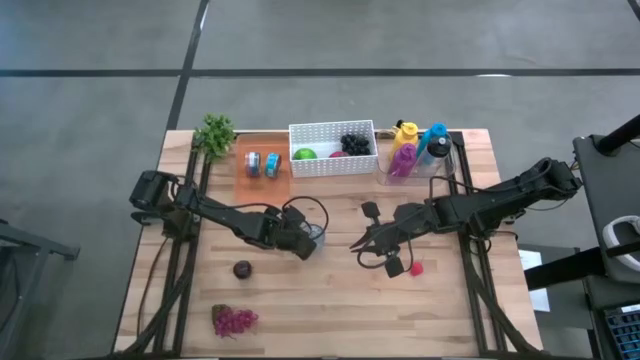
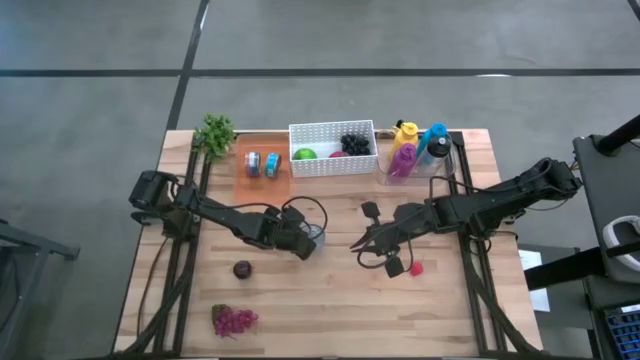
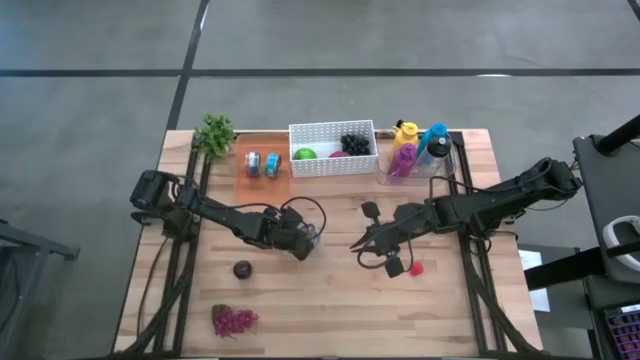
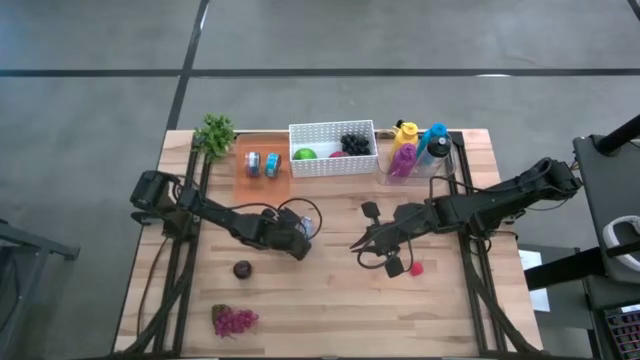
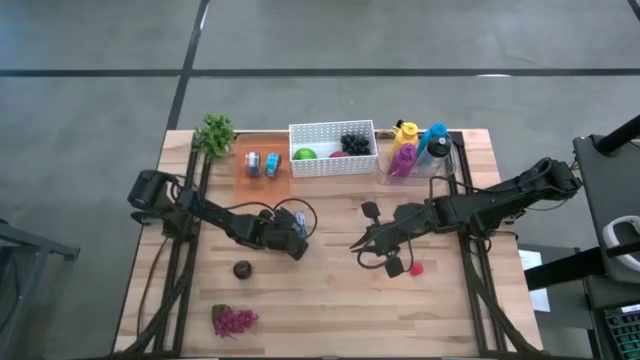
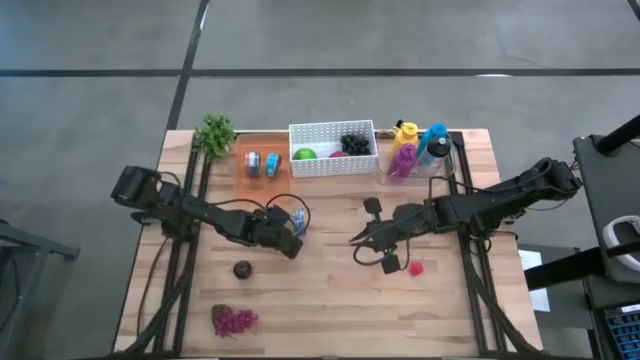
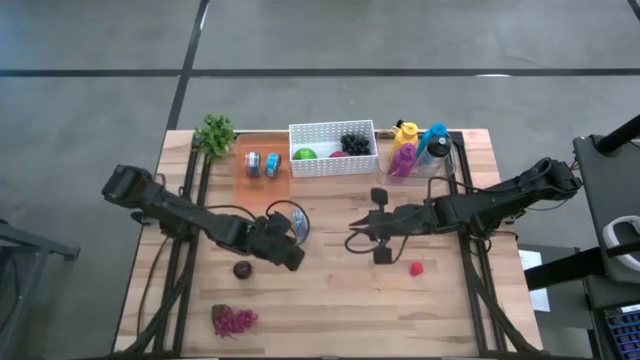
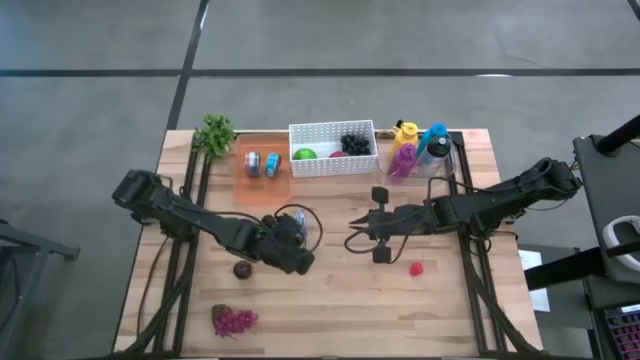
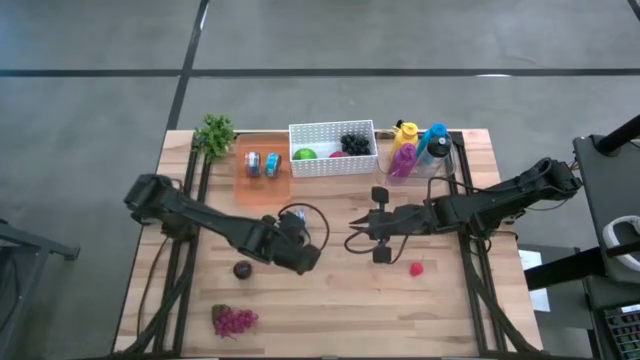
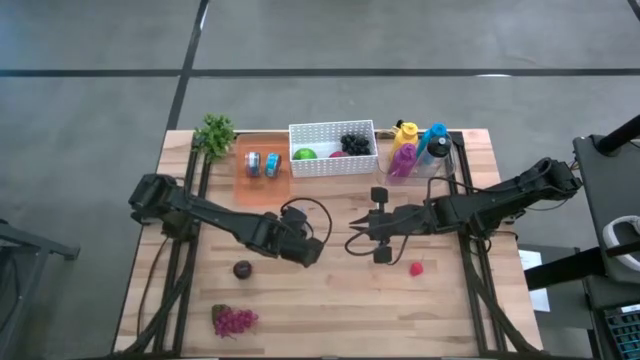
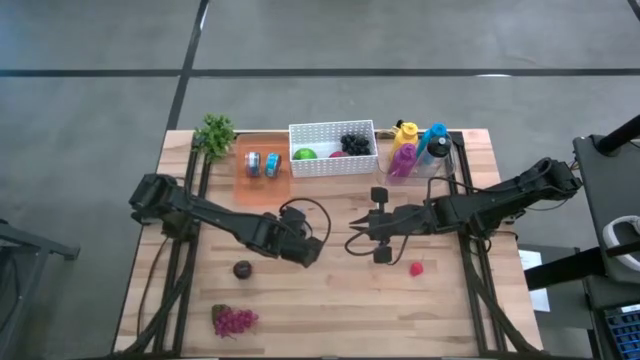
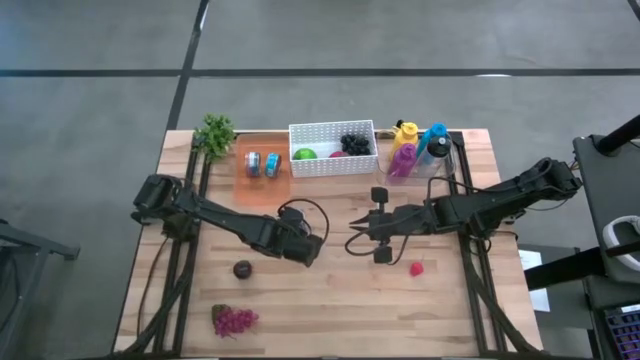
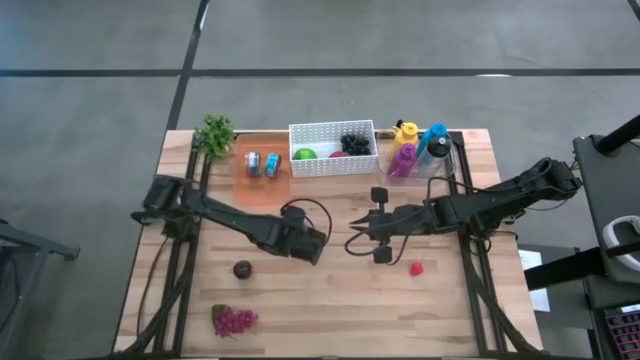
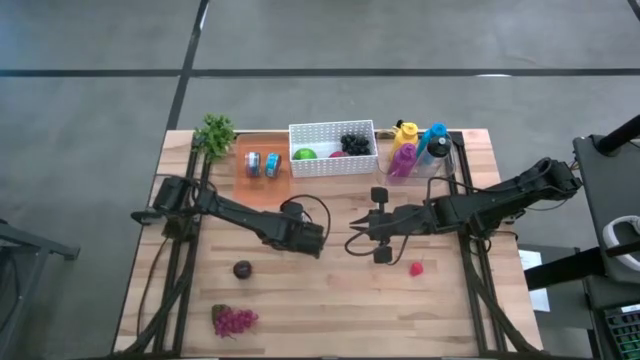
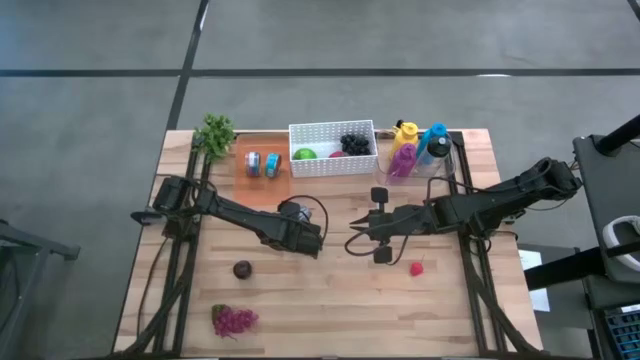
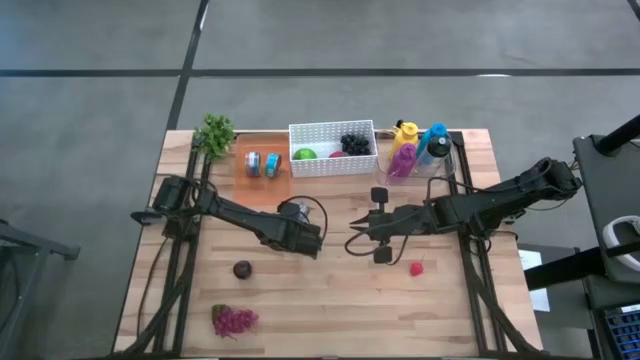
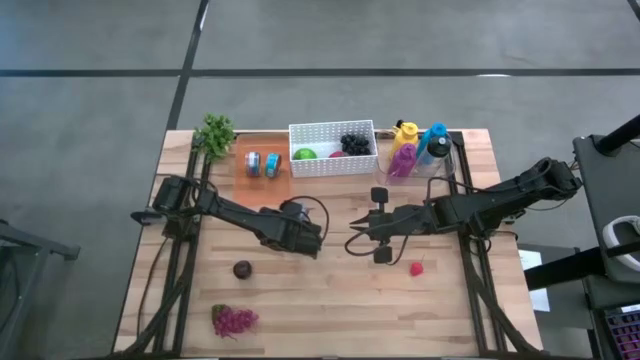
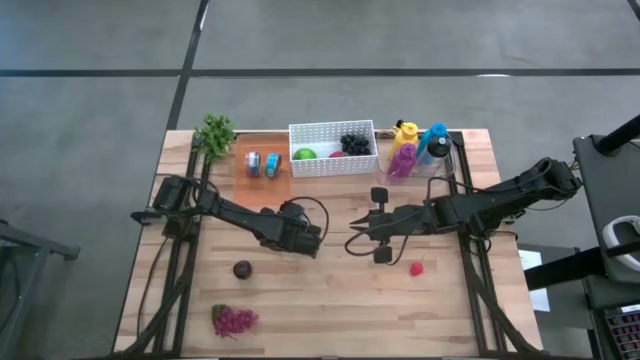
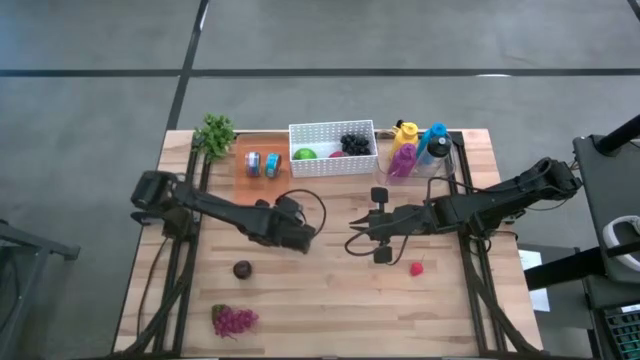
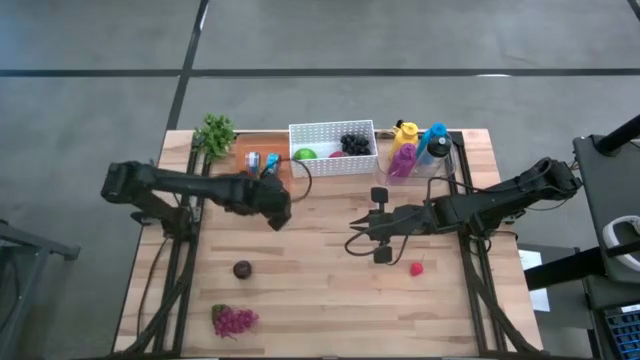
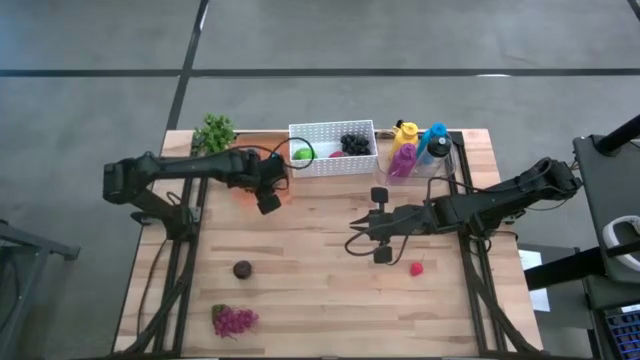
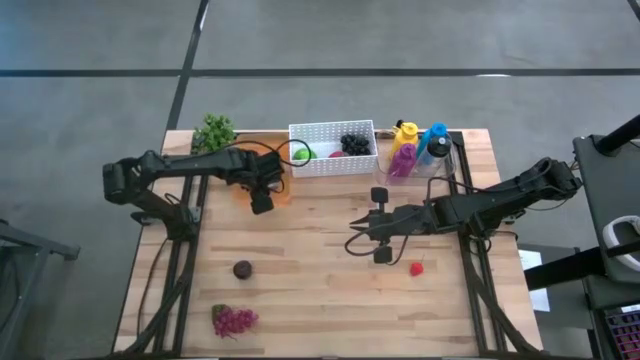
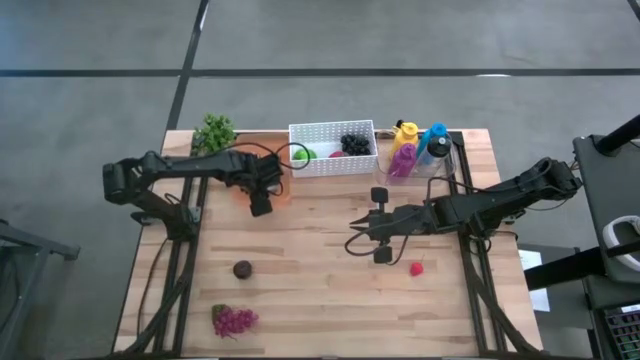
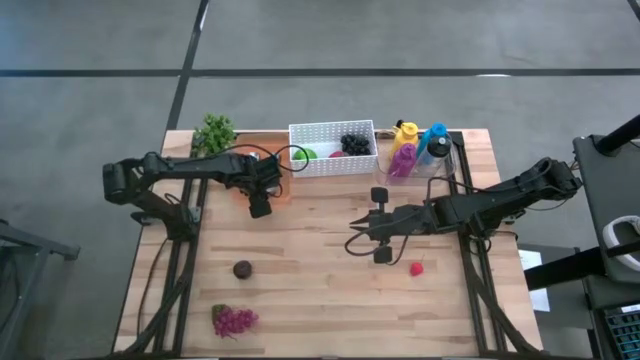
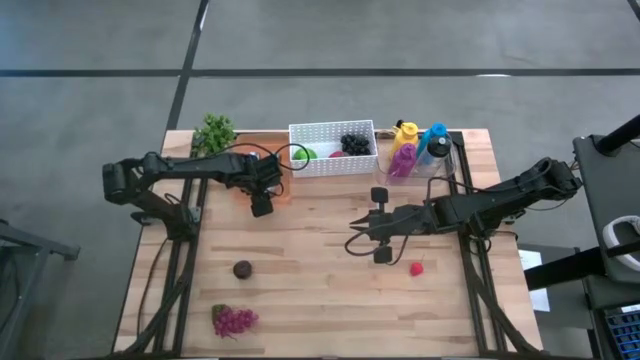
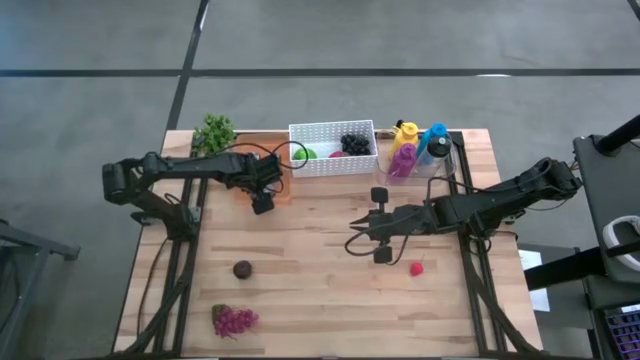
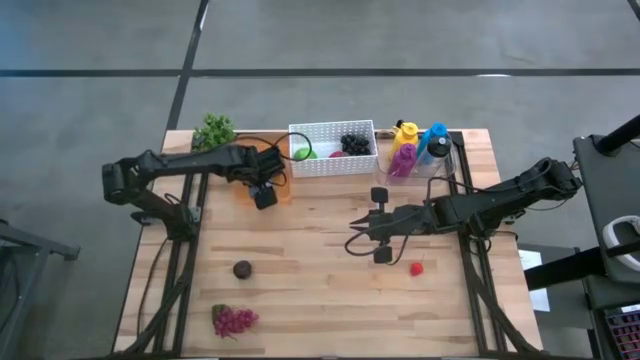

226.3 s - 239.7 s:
Task: Pick & Place Food Item
Put the blue tuna can into the orange bin

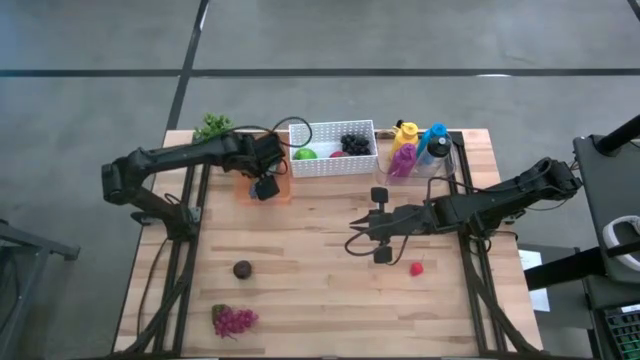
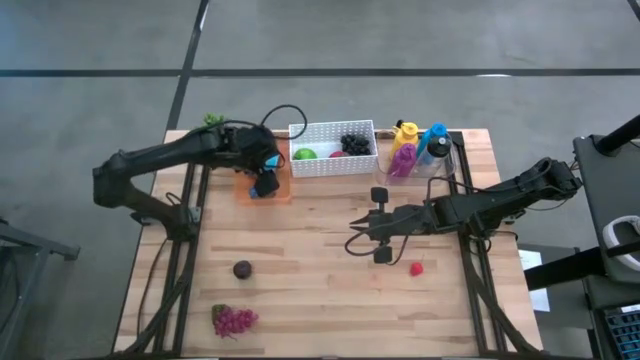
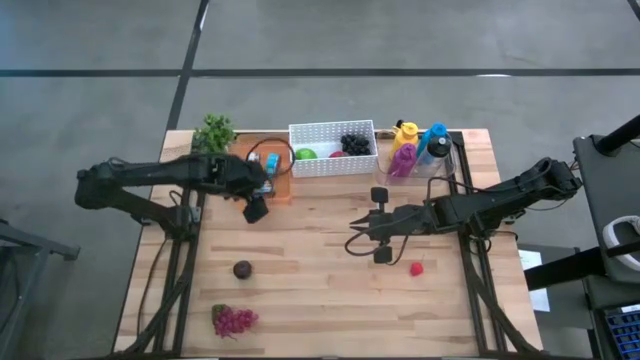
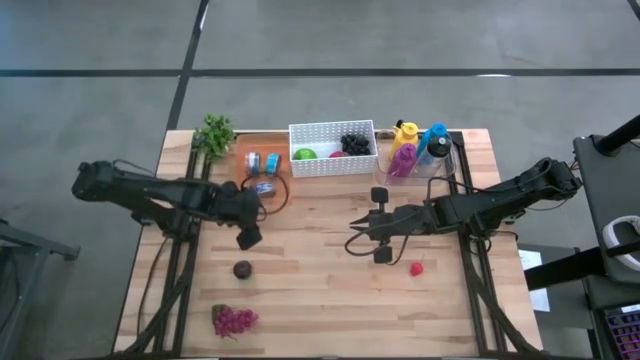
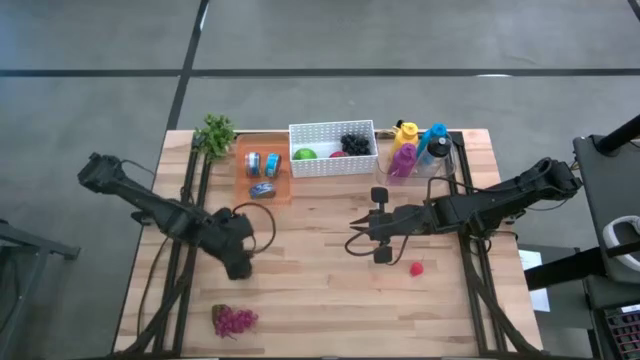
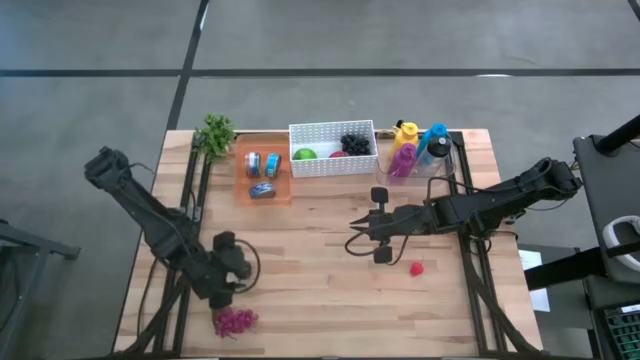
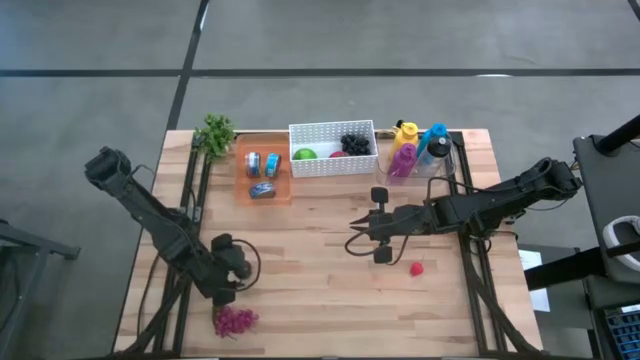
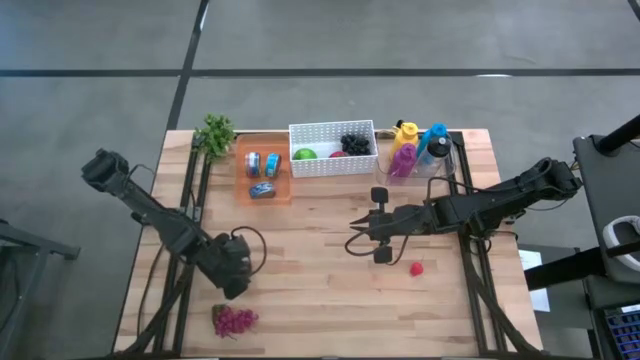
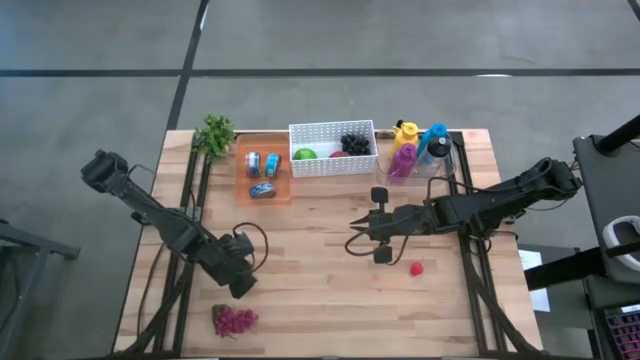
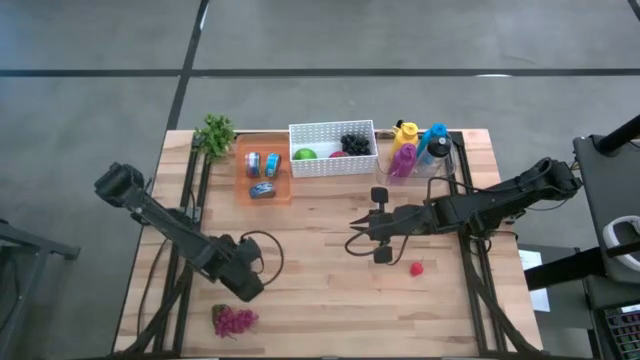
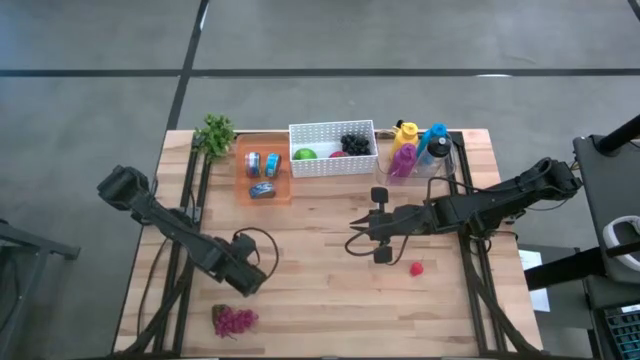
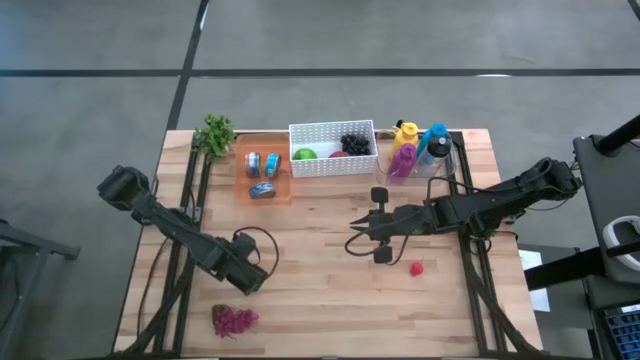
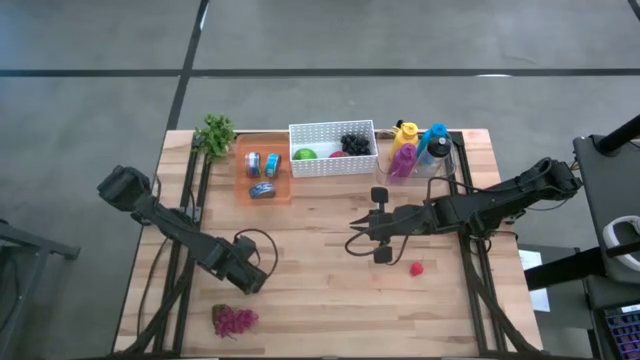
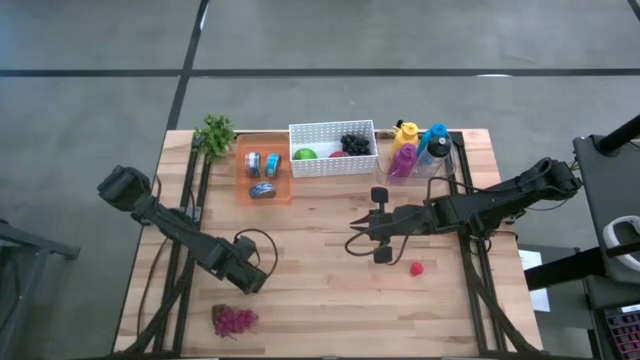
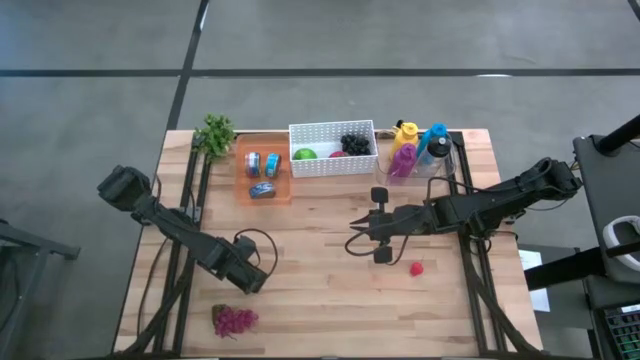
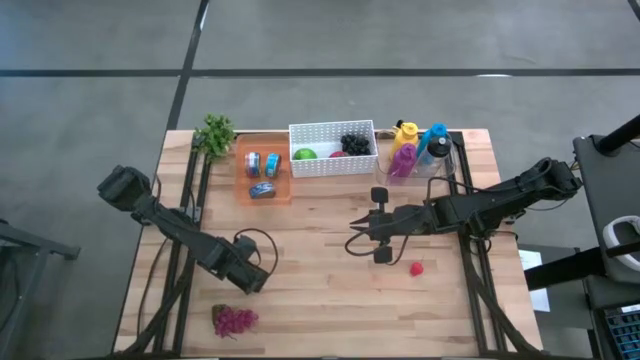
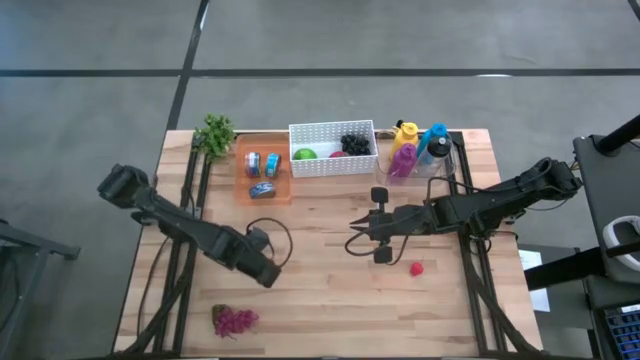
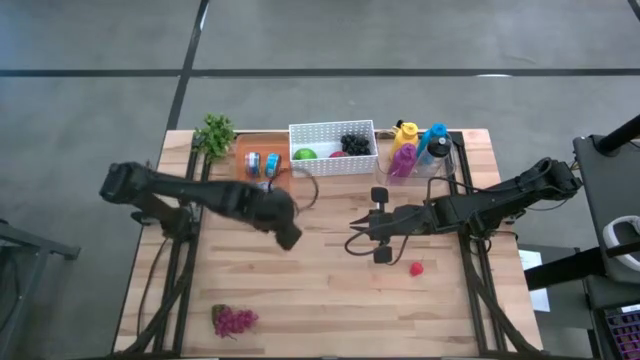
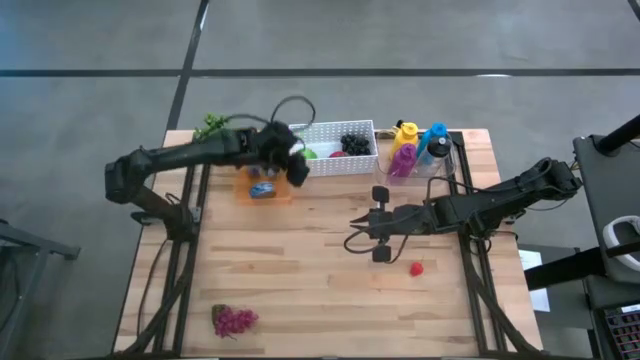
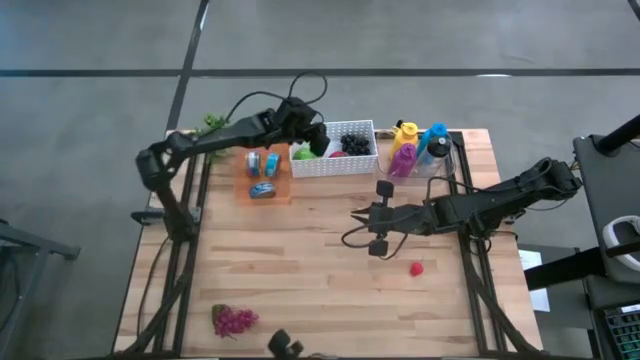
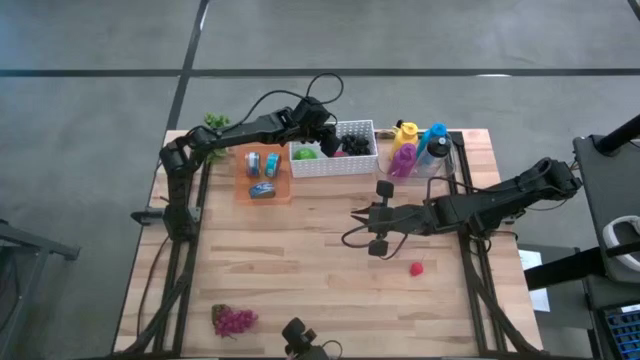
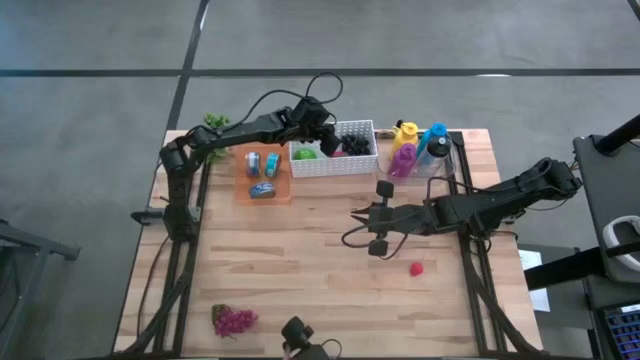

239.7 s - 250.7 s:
Put the plum into the white bin
